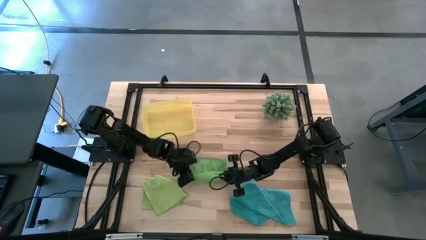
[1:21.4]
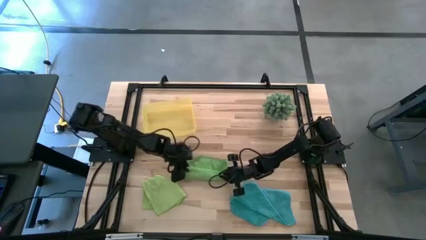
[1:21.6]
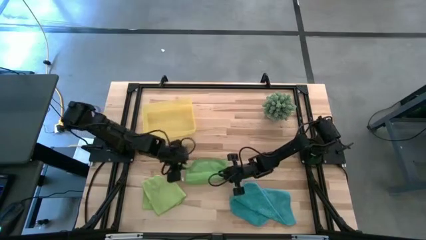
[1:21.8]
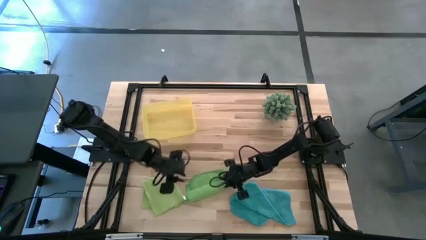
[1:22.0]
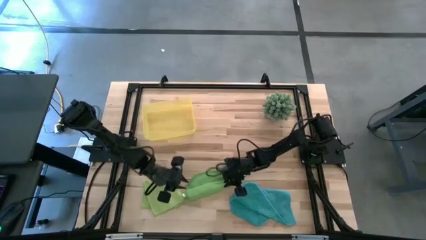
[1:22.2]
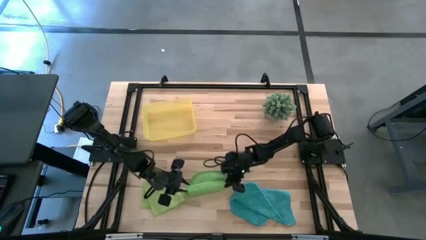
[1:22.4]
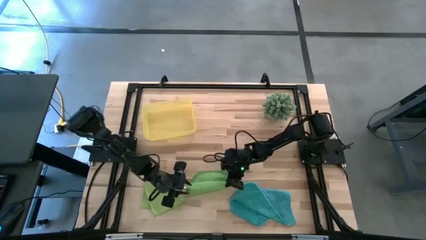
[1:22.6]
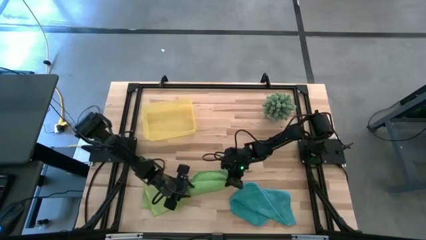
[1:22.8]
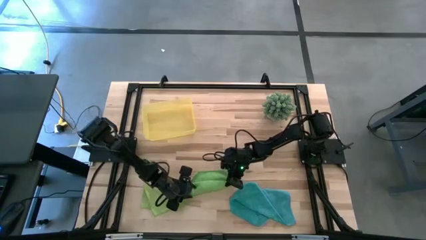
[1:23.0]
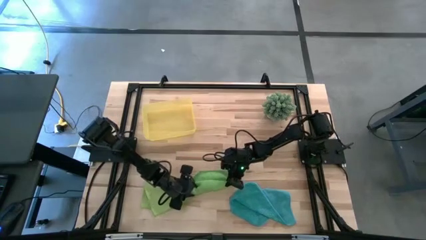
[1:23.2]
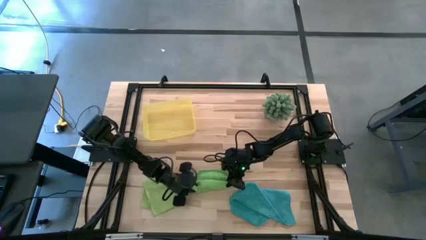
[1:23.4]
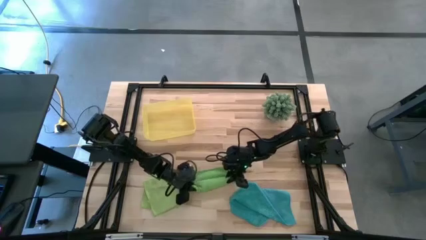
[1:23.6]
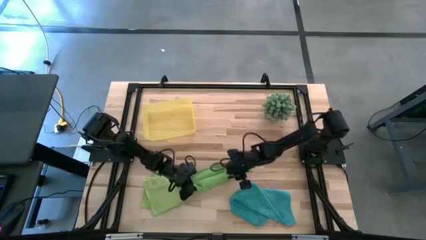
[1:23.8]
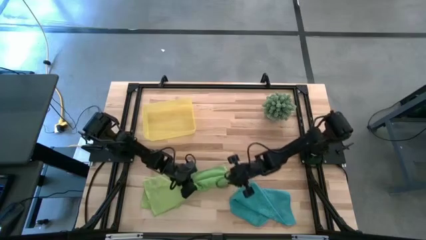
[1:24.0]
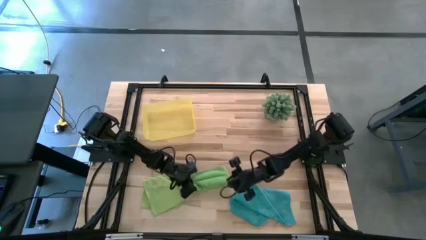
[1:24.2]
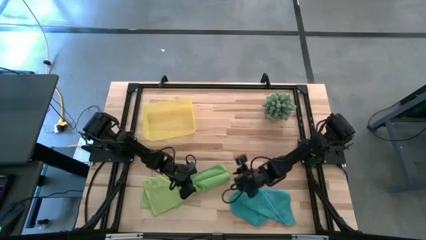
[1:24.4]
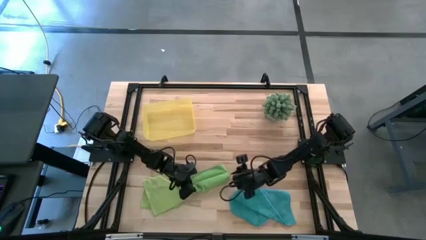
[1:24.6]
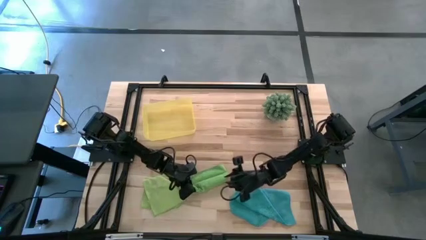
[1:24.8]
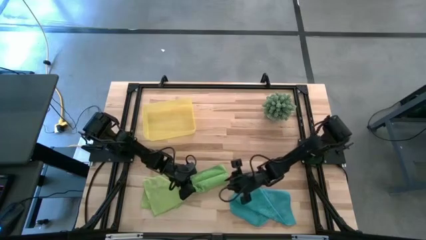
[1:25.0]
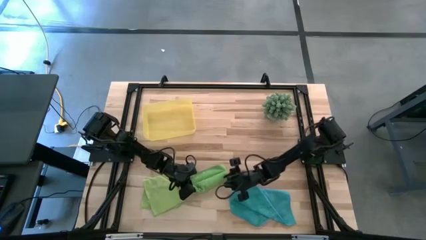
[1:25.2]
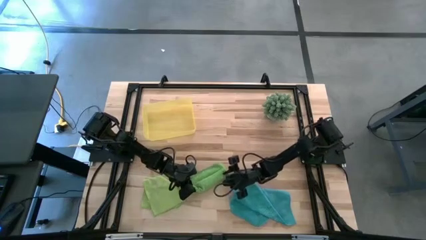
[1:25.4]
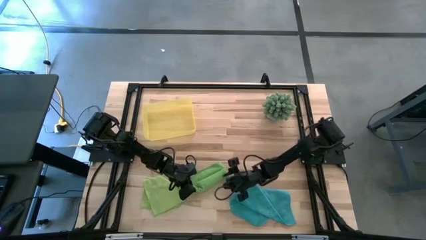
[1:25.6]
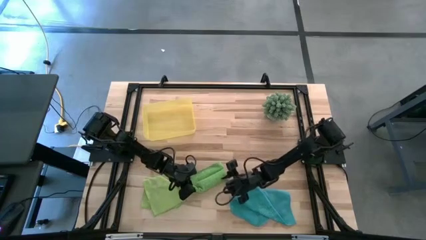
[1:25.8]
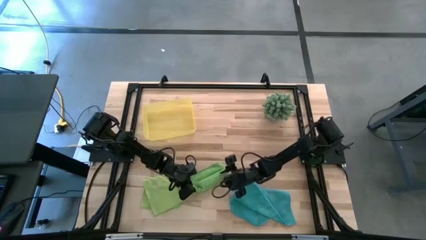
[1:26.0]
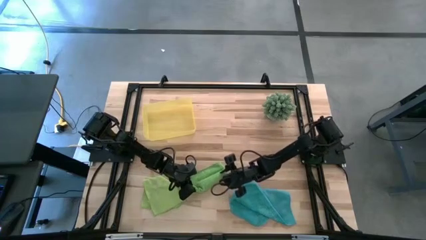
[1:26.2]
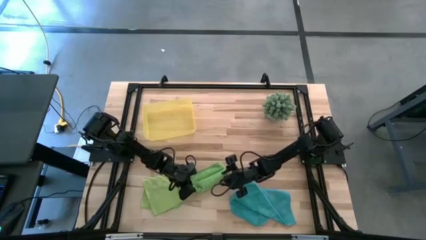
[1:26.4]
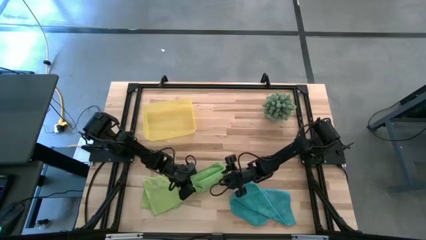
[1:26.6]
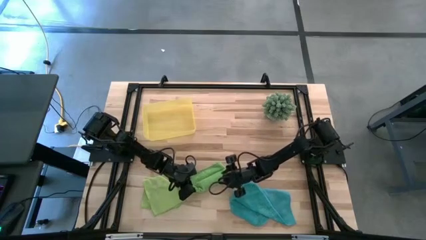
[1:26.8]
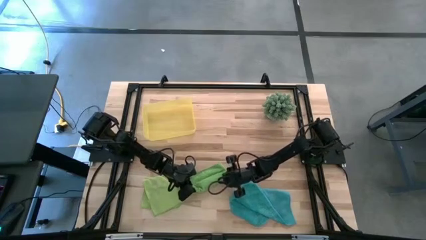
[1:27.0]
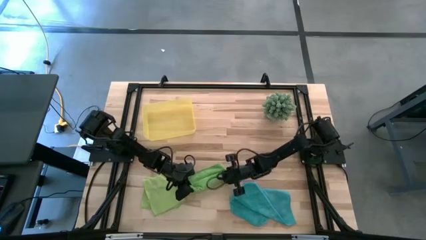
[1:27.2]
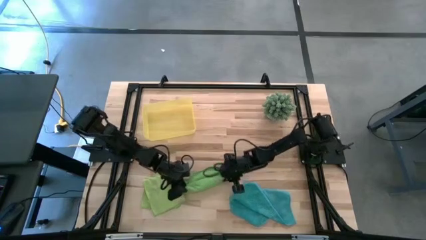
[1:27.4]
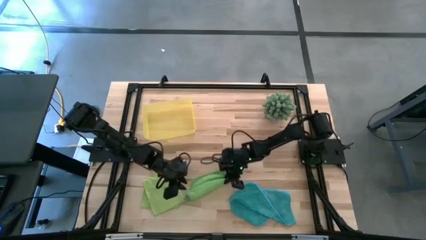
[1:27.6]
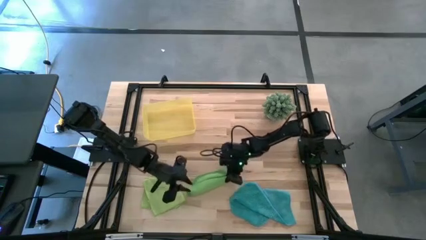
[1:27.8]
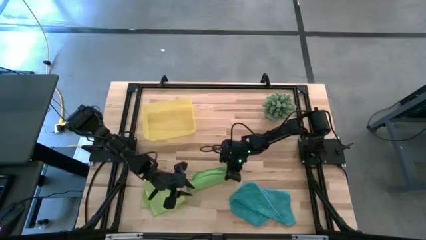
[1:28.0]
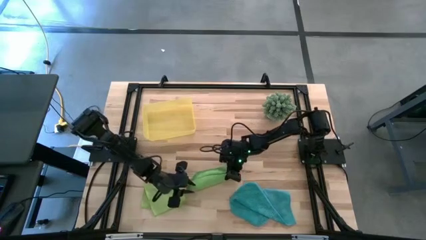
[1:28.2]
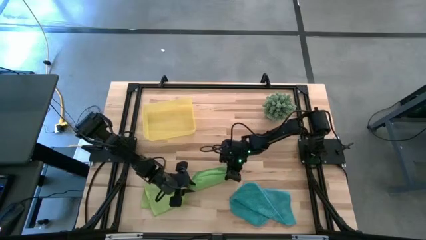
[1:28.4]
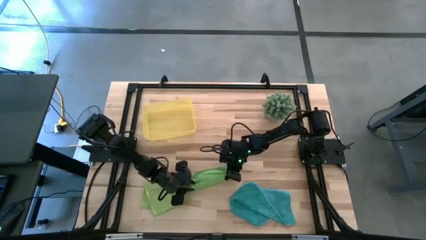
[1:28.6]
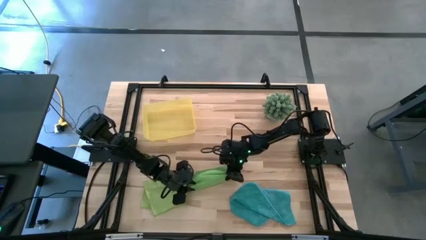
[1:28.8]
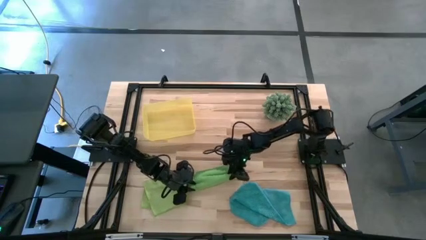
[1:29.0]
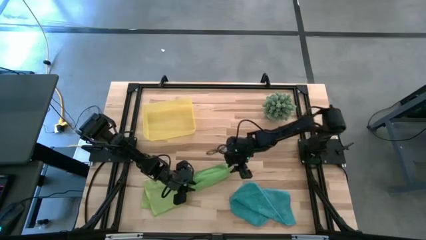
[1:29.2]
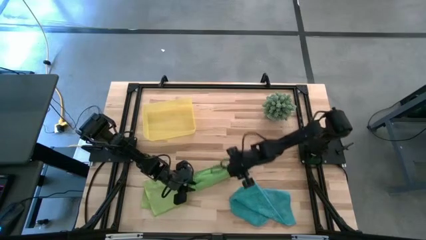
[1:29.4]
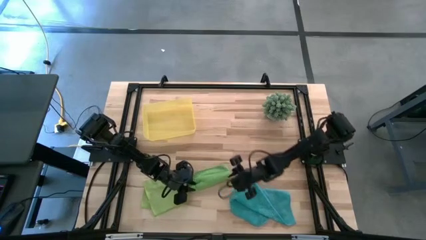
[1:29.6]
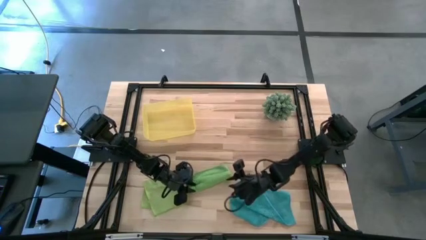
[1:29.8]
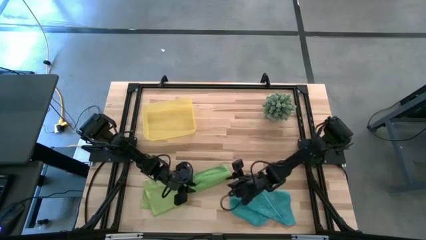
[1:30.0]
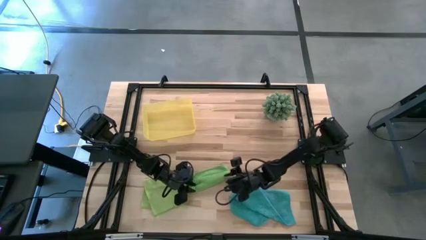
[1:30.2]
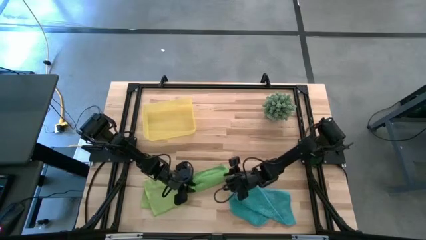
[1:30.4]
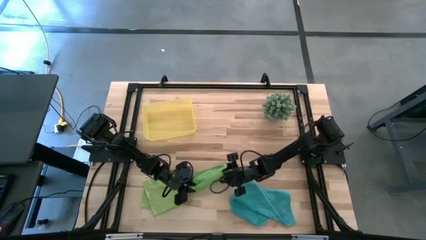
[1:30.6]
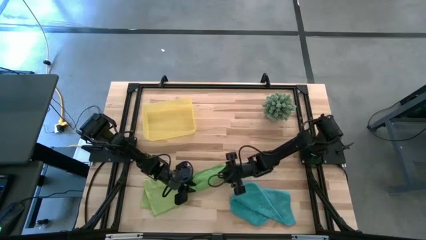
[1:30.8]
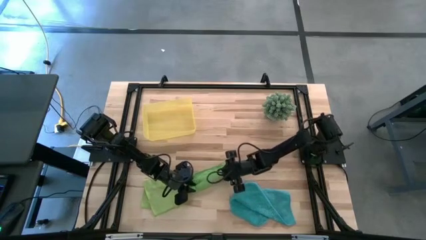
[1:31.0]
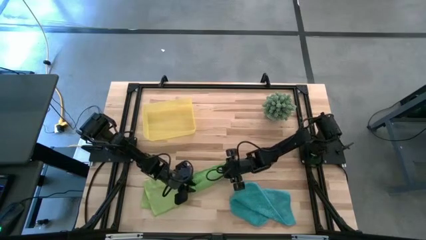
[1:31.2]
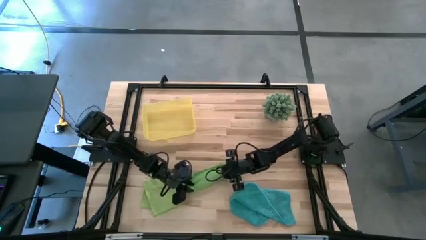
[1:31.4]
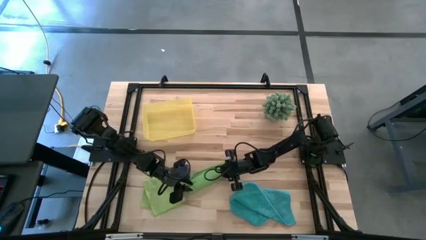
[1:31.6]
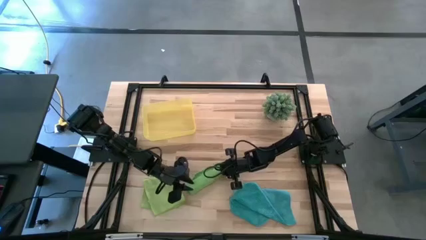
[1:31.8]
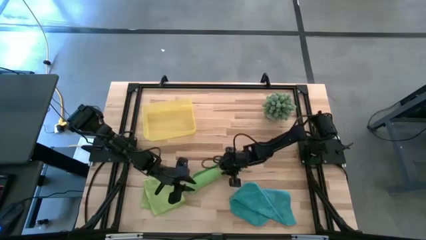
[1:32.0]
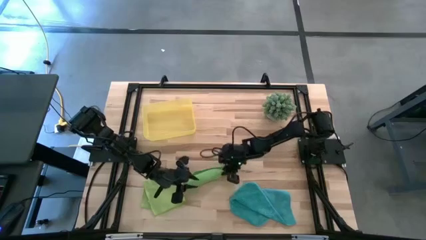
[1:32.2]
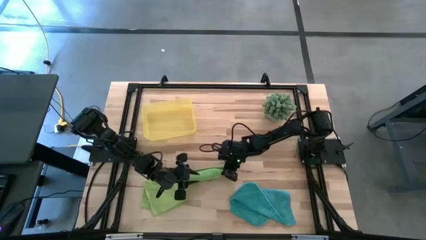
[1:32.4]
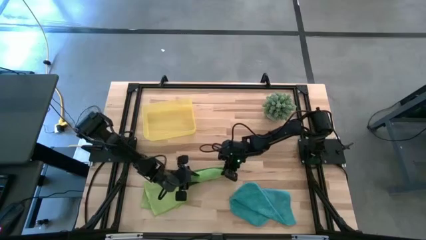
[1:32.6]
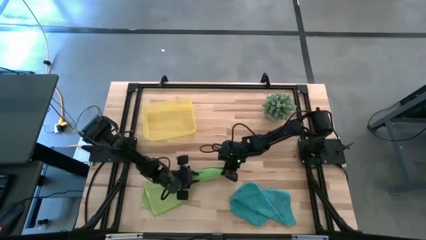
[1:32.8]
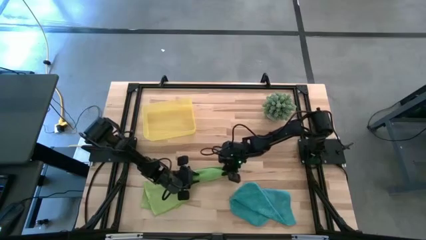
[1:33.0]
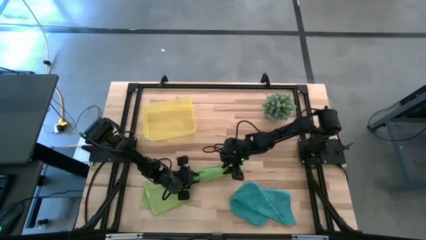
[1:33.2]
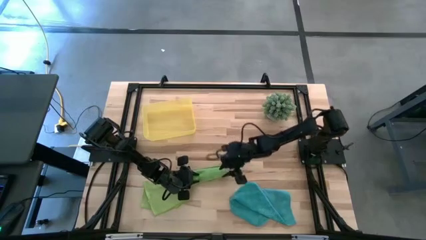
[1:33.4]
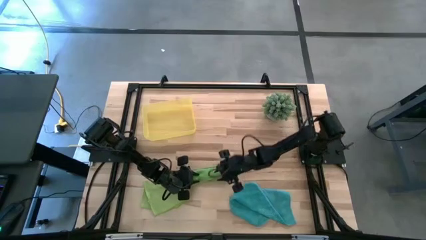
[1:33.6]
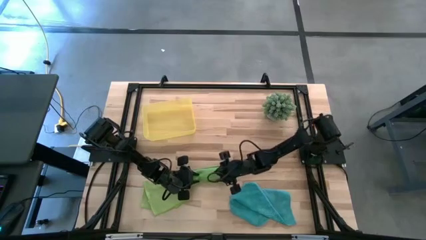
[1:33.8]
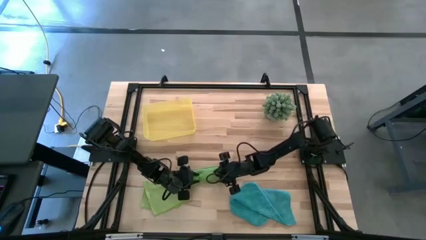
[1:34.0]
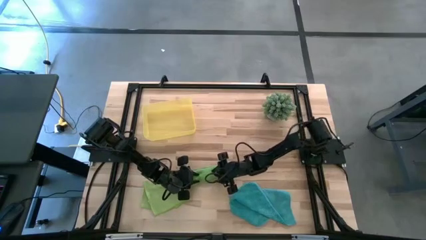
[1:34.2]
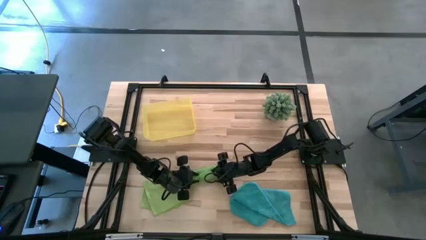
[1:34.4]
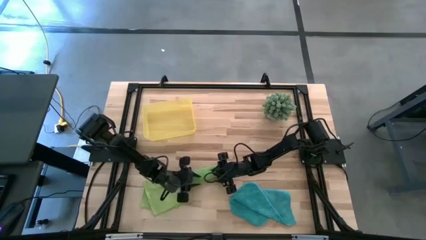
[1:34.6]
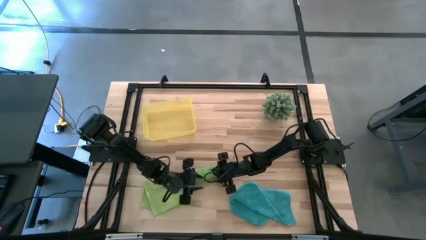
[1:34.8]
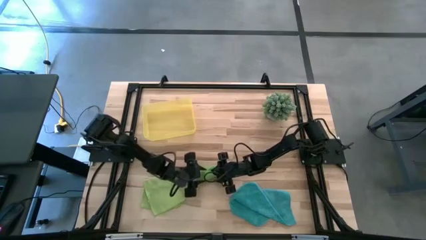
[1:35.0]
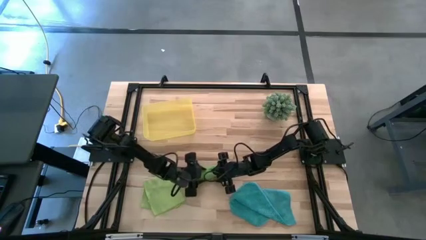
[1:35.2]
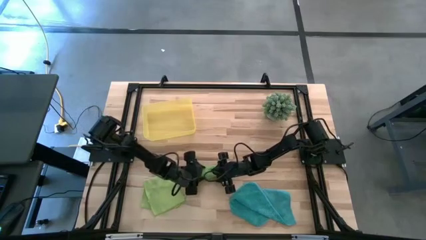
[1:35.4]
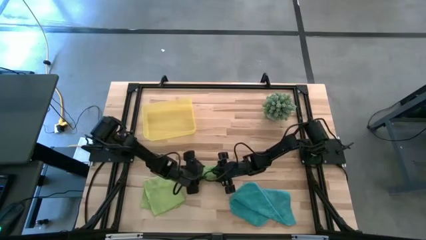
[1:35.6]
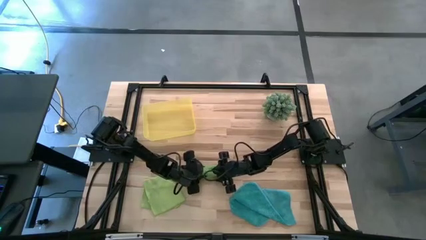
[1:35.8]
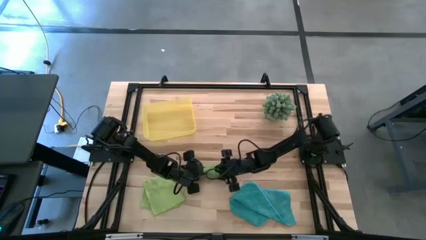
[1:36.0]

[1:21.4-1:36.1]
Task: Roll microfiber towels into tight, uniform cylinder then place into a basket
Roll the green microfiber towel

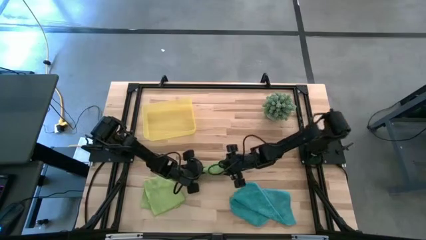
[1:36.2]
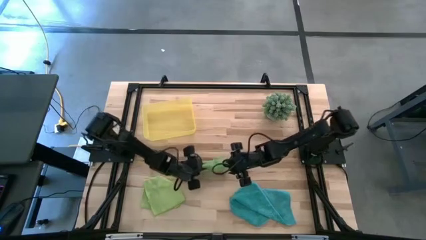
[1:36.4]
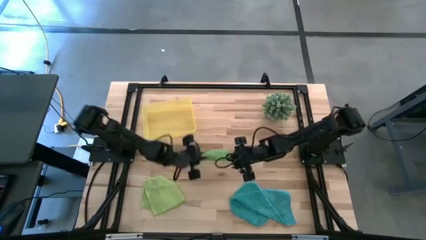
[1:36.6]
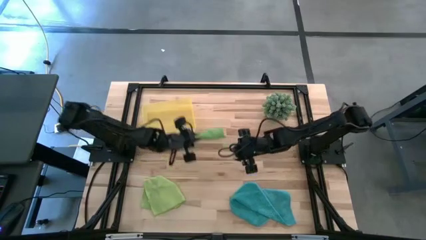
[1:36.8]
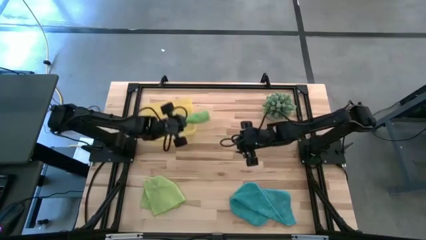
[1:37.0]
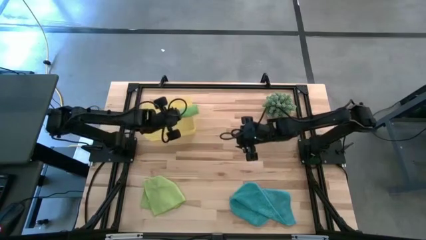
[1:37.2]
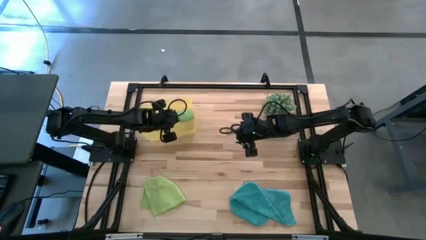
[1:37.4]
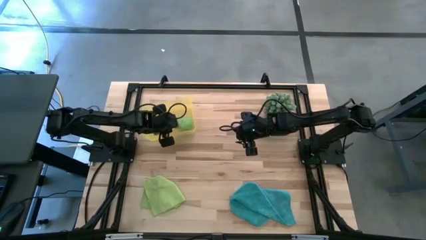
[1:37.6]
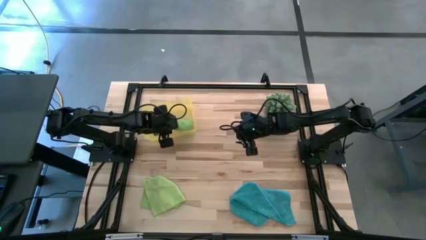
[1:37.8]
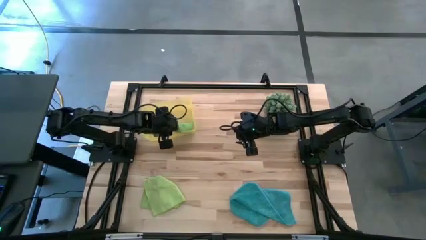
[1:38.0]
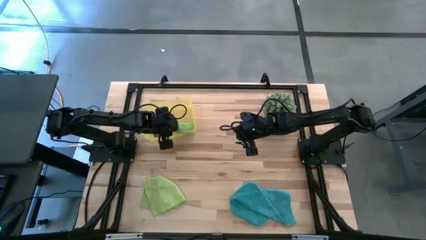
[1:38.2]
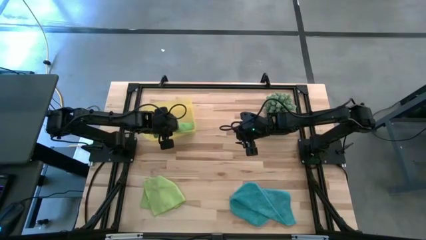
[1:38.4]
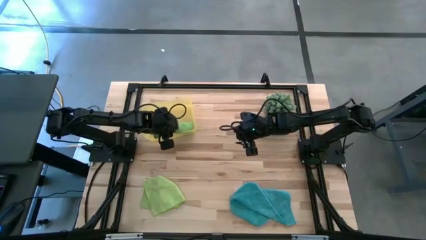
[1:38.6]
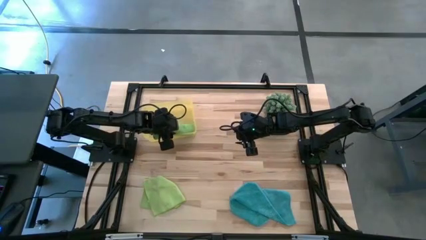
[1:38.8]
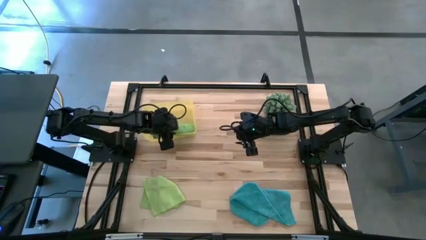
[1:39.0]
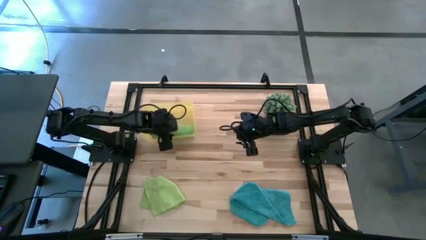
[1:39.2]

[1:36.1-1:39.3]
Put the green microfiber towel into the yellow bin
